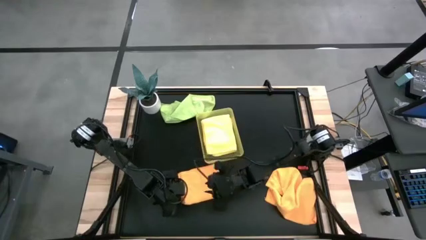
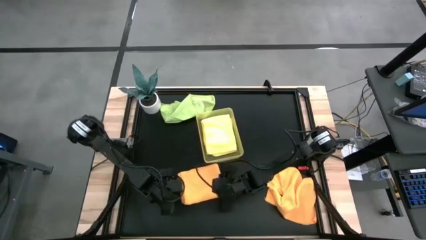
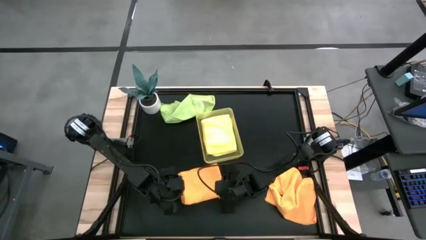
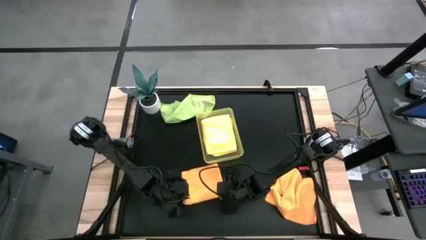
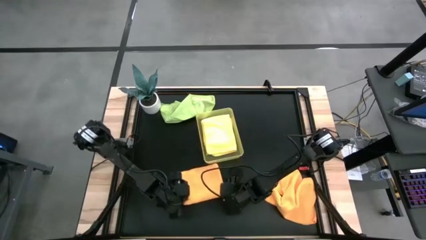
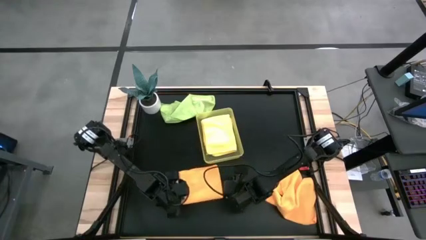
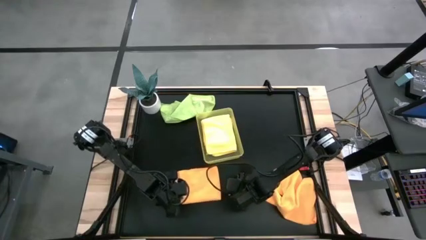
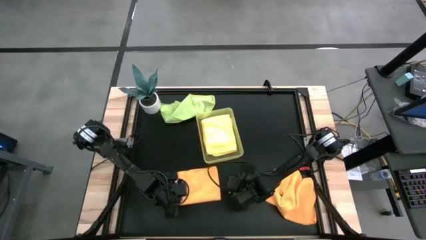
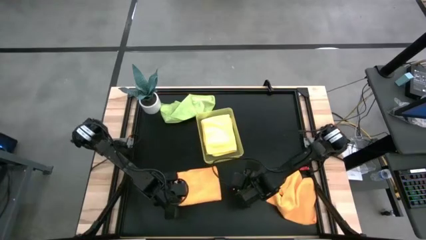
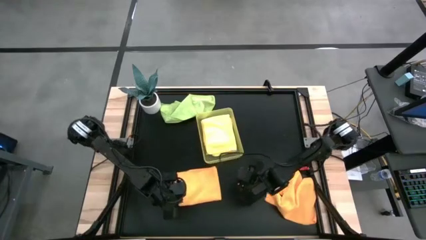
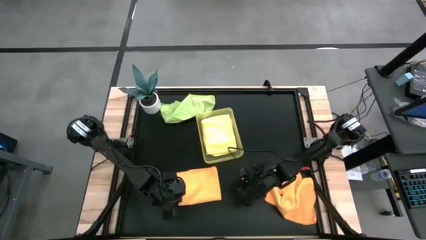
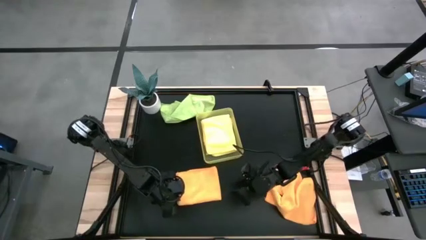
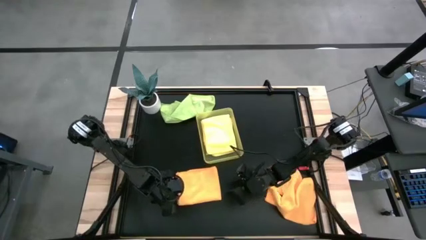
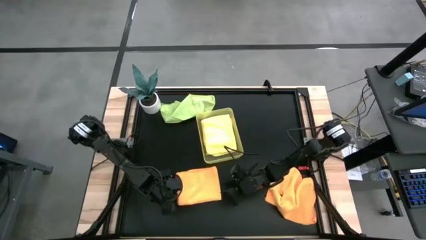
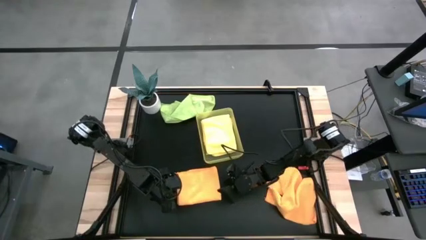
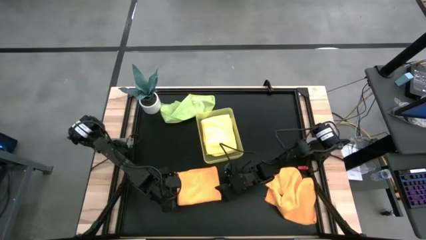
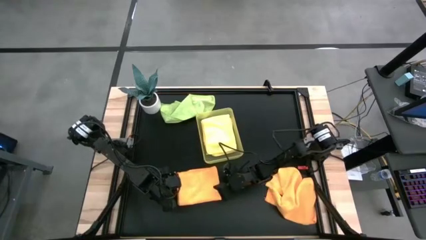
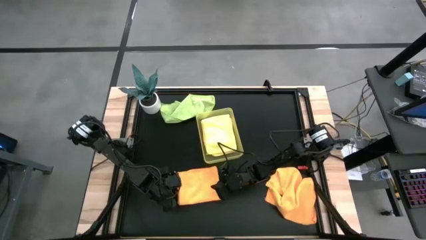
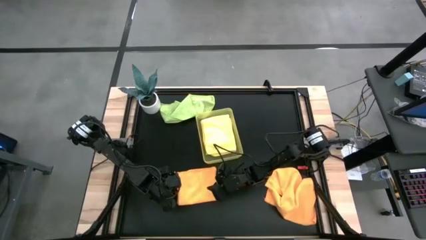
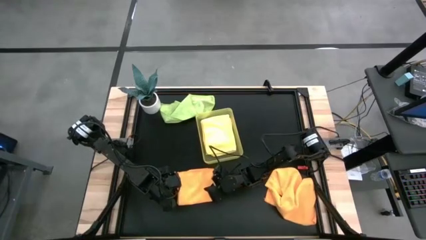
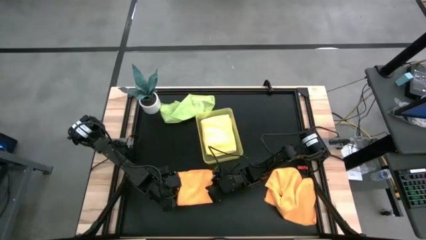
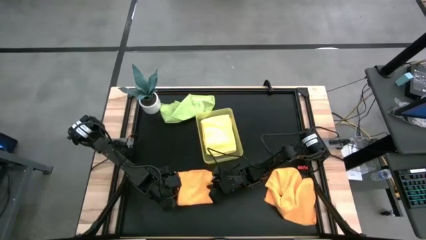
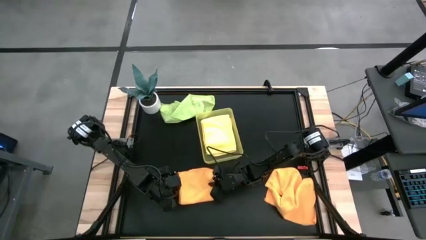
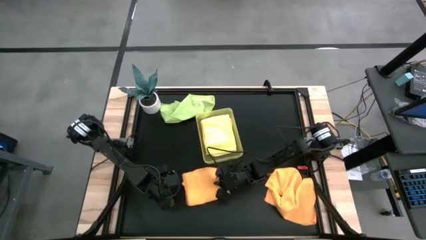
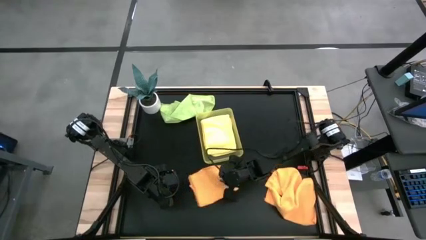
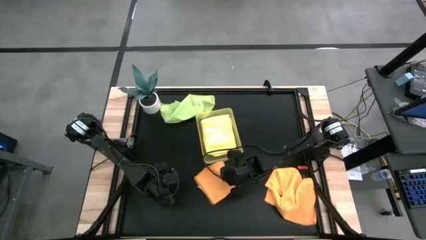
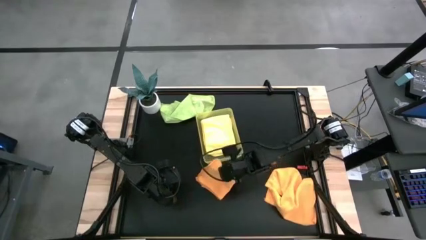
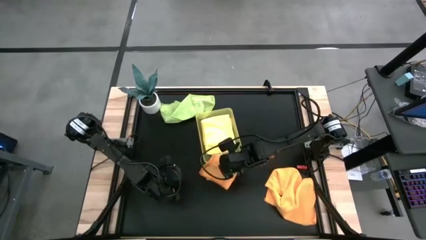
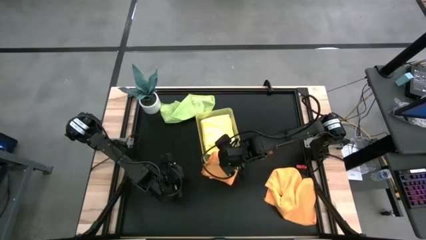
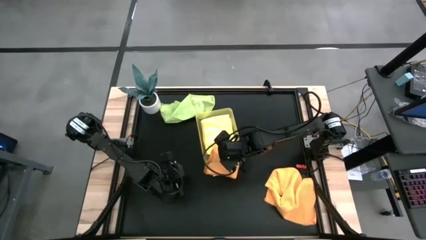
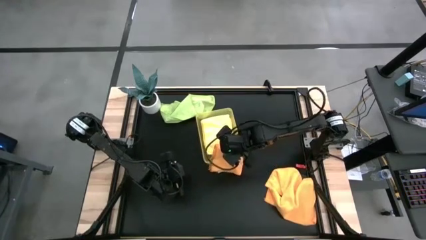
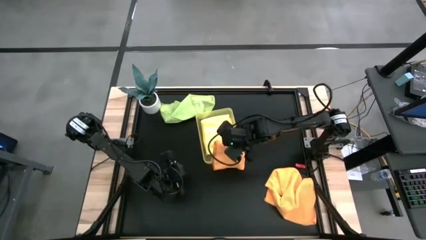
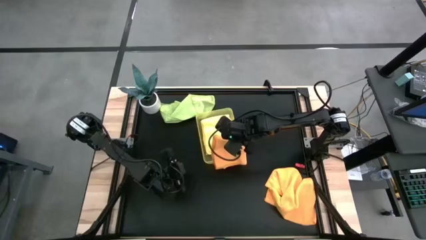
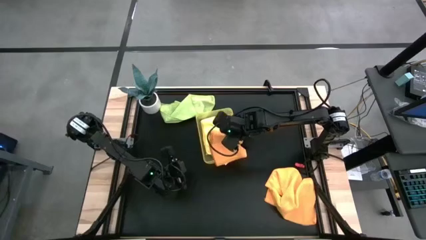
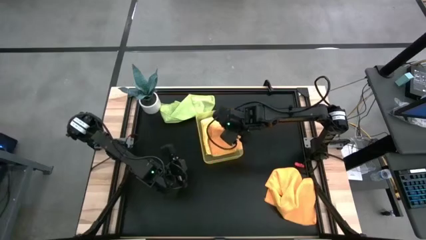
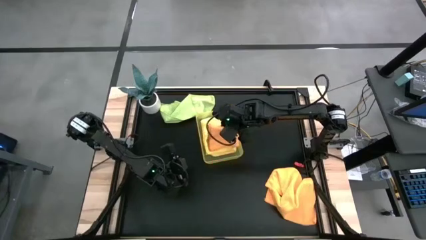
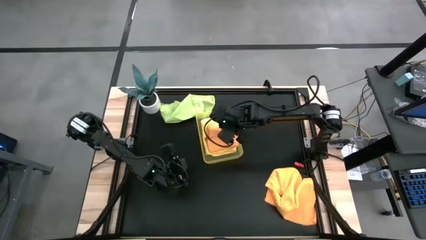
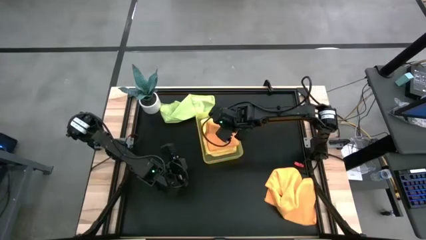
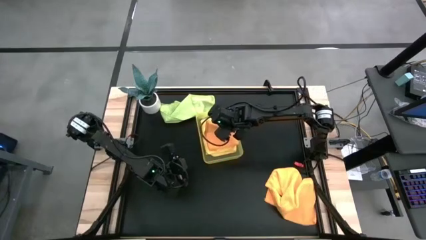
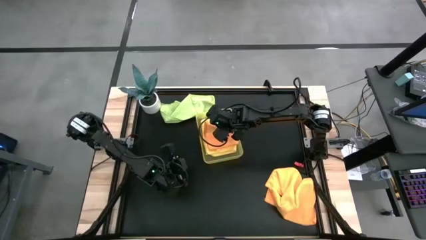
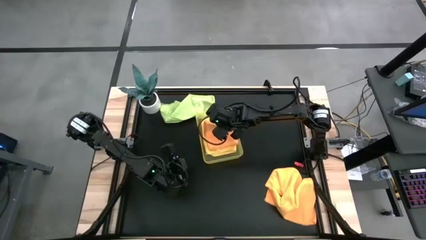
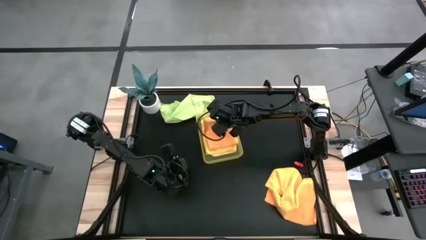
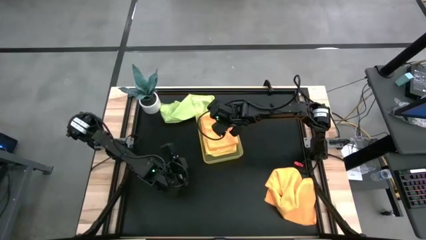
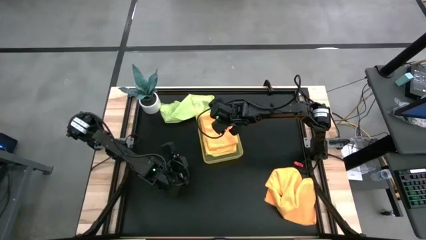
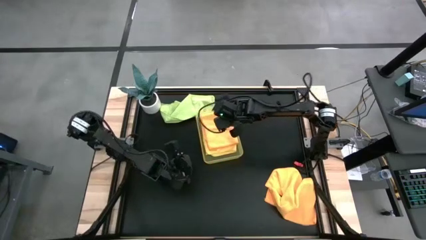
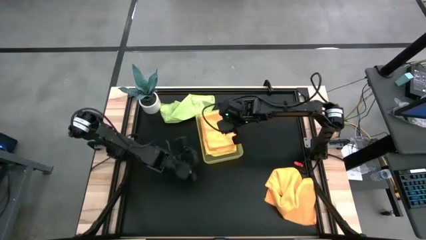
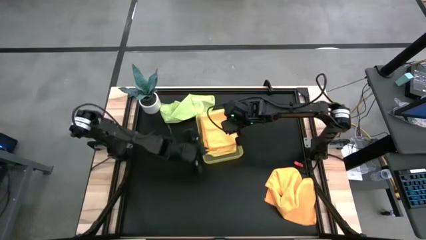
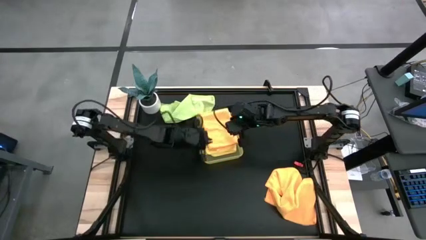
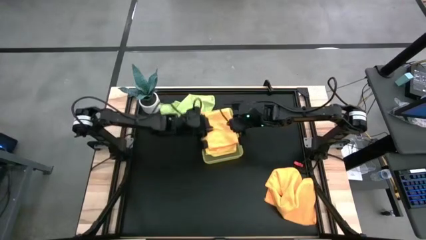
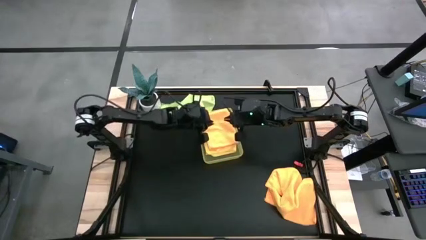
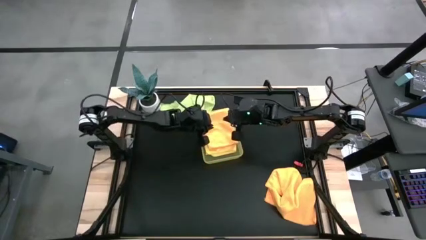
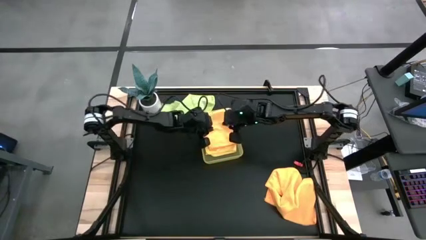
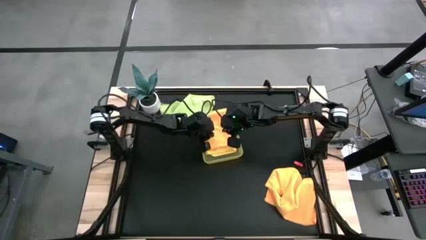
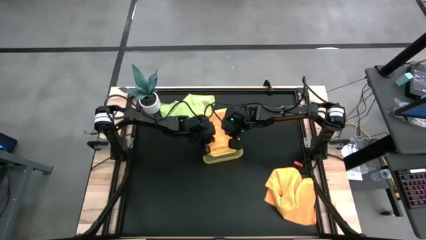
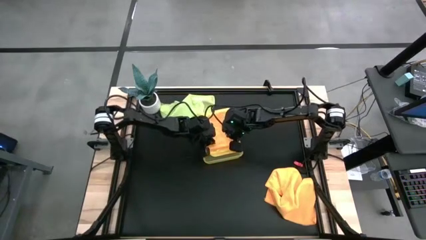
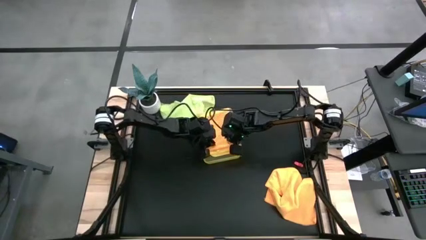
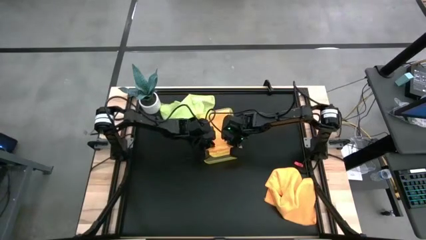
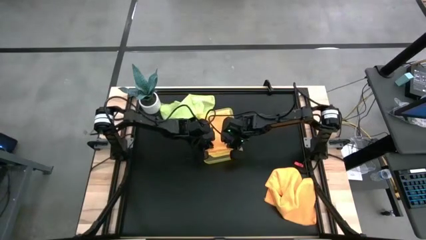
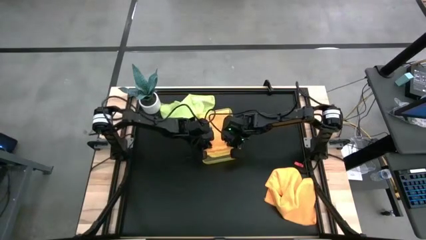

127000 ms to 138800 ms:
Task: Fold microfiber towels
Put the folded left orange microfiber cloth yellow microfiber cloth into the bin

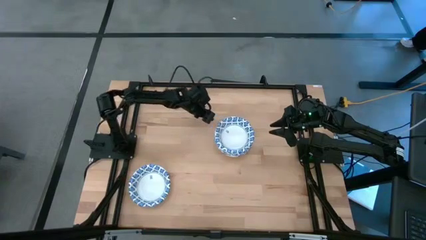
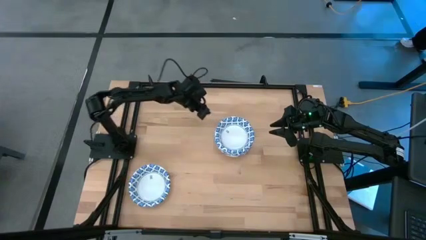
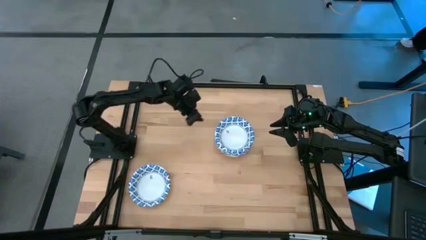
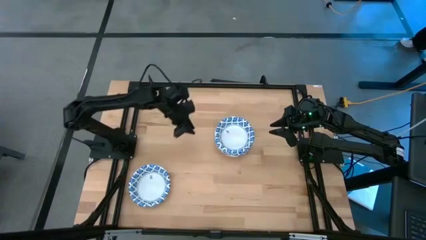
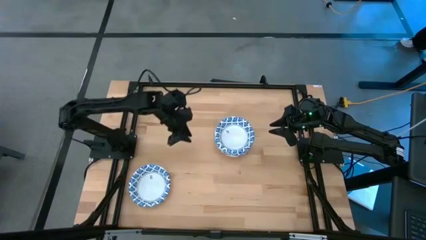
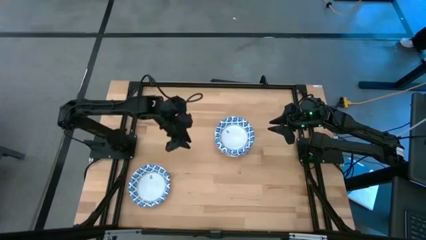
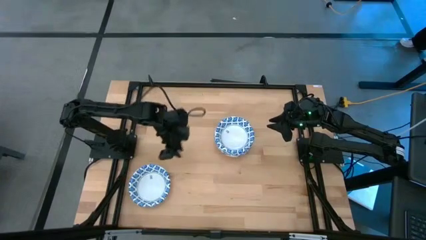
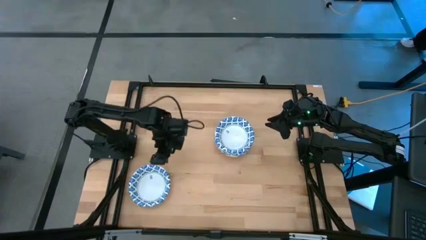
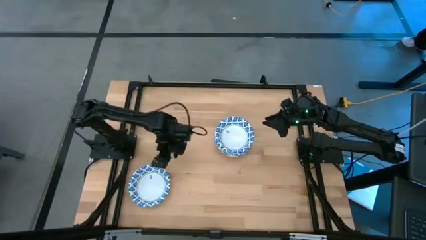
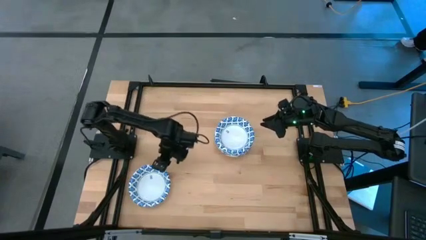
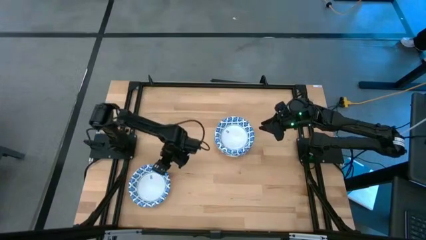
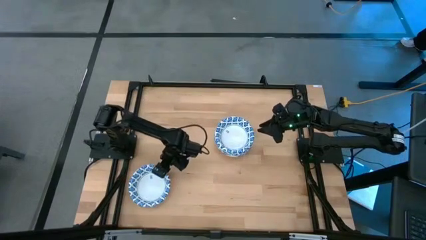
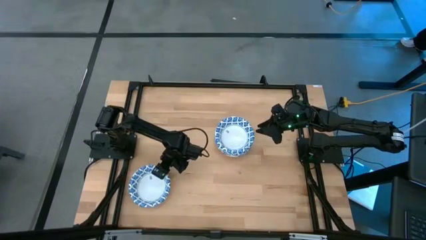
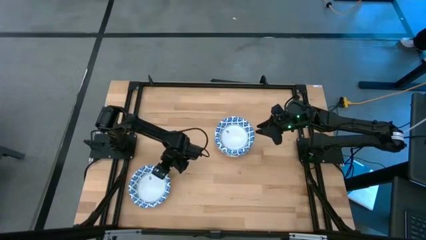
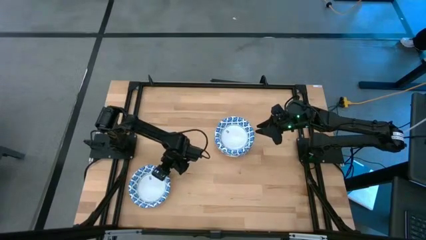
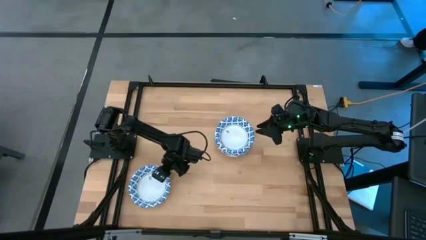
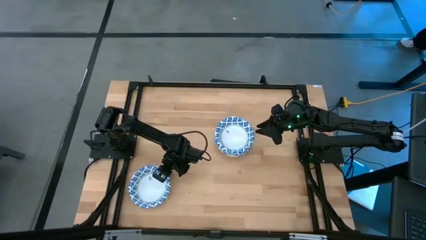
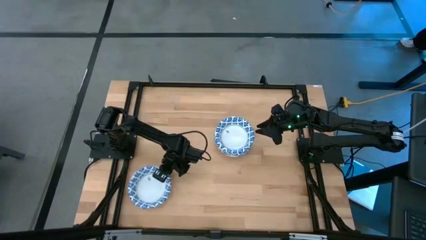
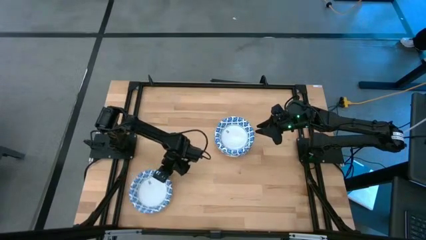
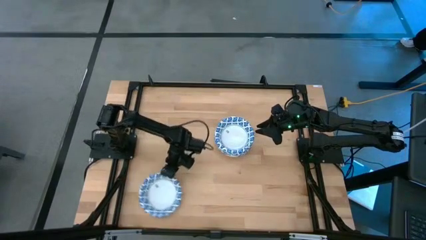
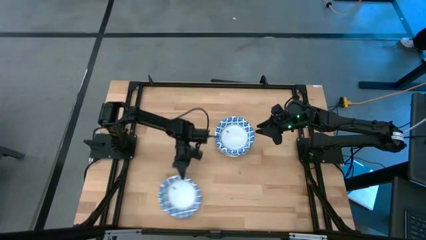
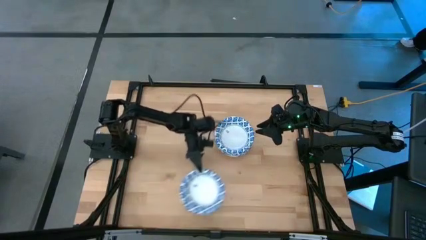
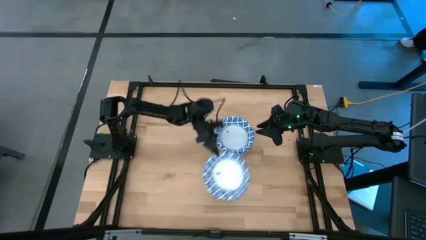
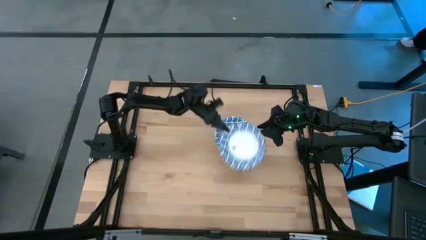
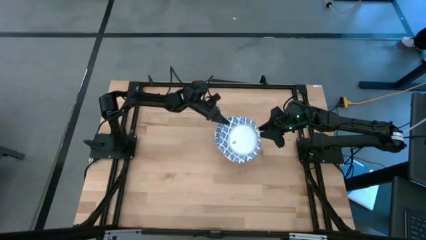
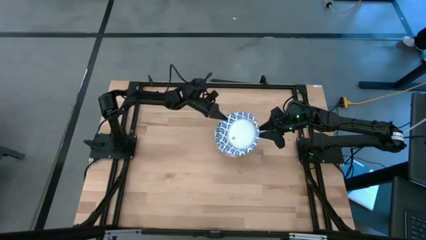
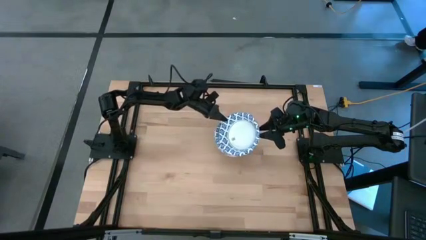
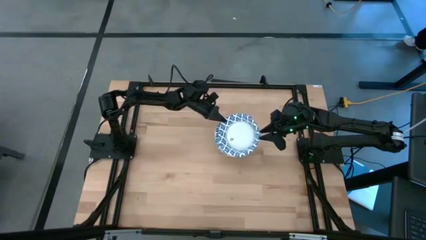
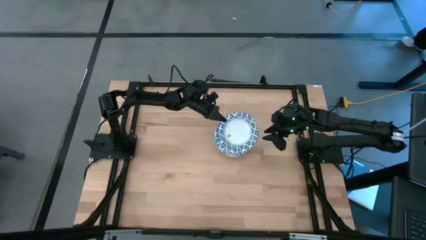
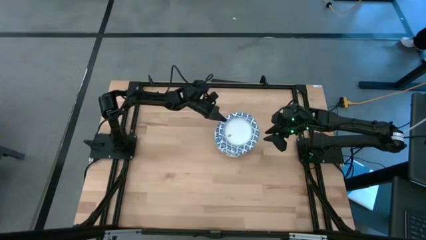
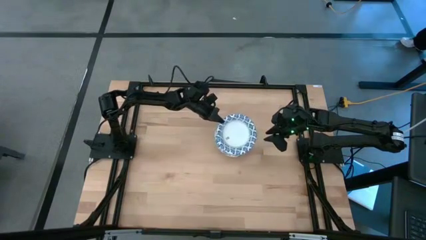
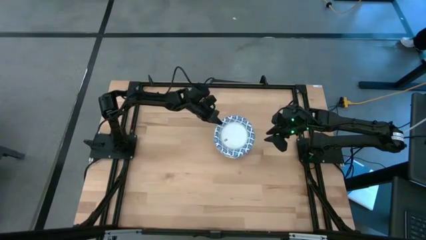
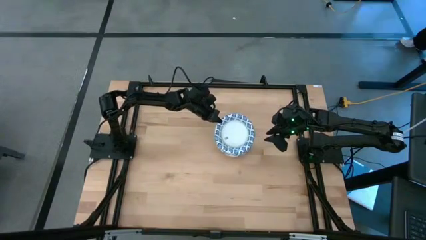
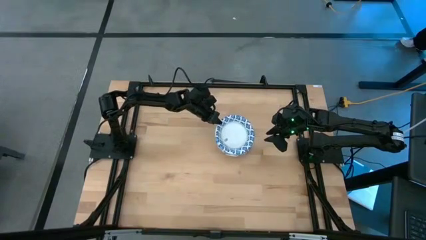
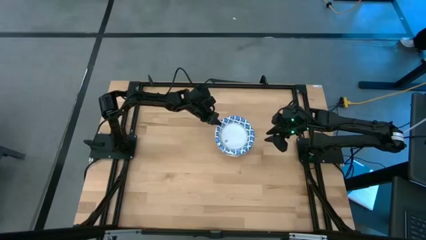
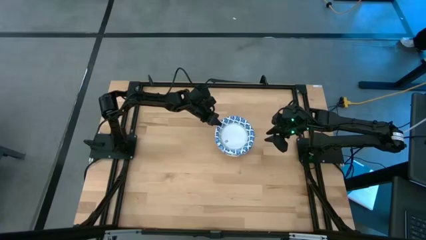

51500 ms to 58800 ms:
Task: Nest bowls inside each other
Stack the blue patterned bowl on top of the other blue patterned bowl
